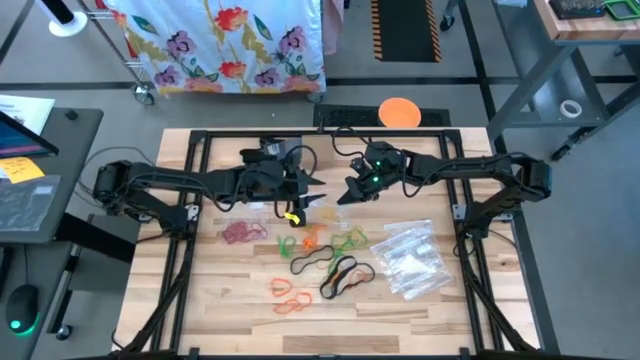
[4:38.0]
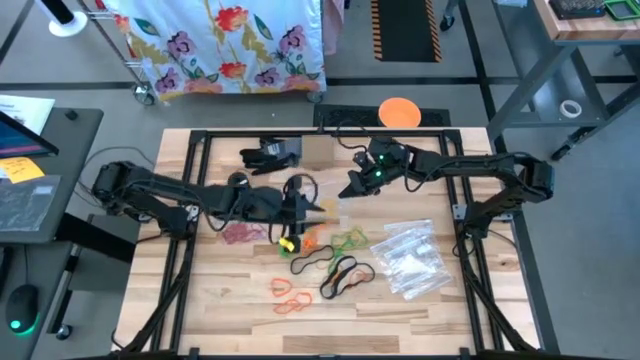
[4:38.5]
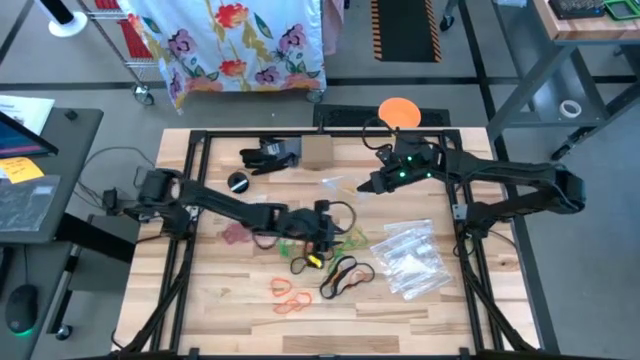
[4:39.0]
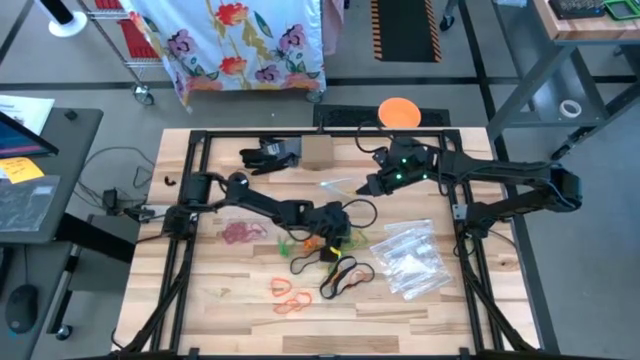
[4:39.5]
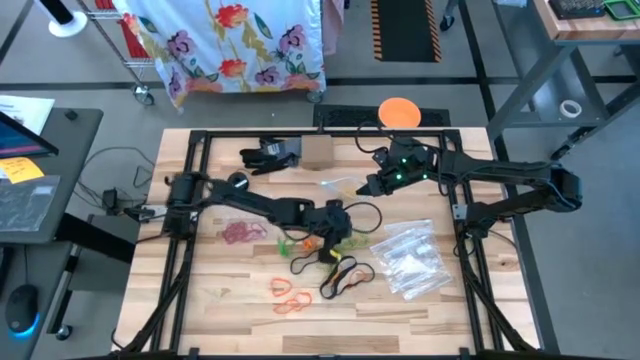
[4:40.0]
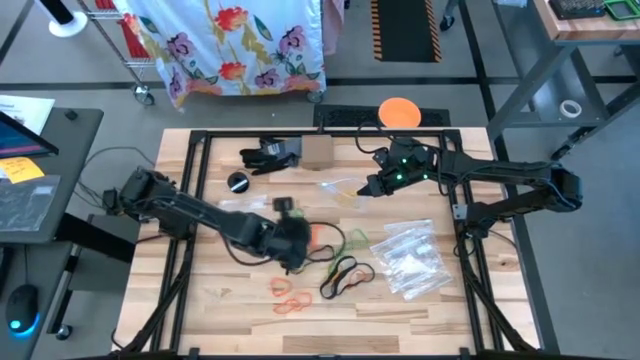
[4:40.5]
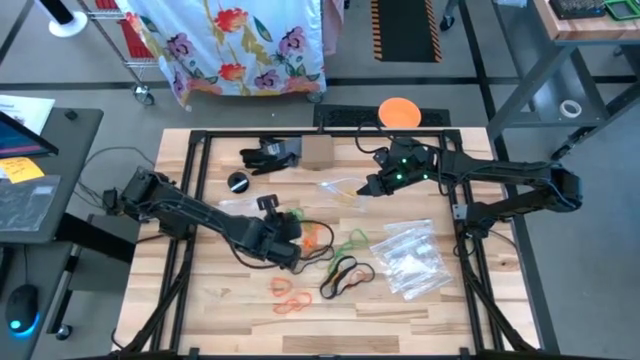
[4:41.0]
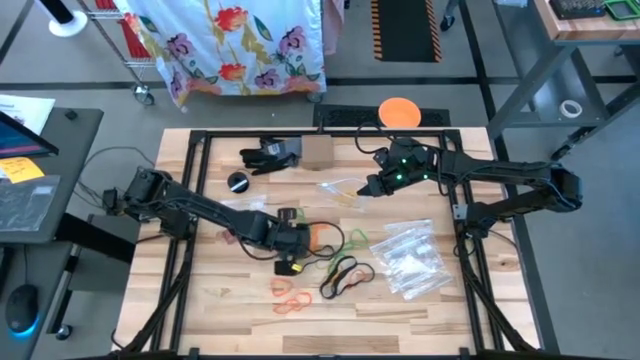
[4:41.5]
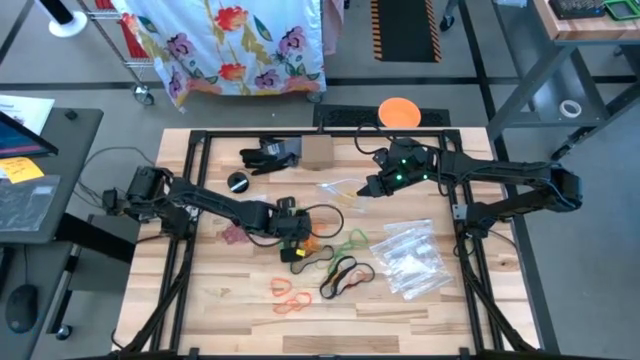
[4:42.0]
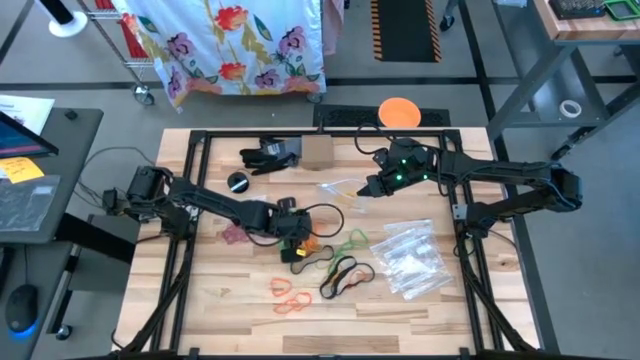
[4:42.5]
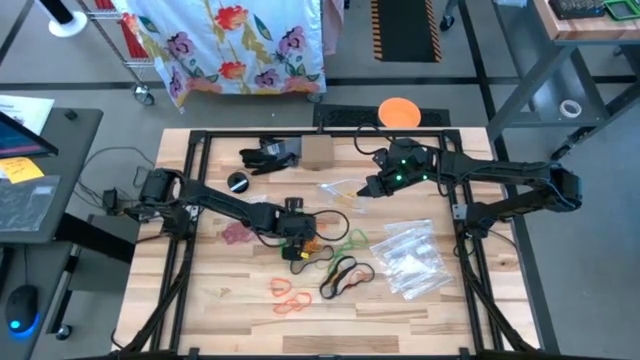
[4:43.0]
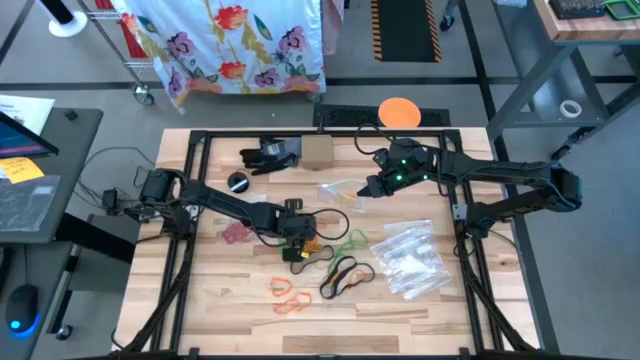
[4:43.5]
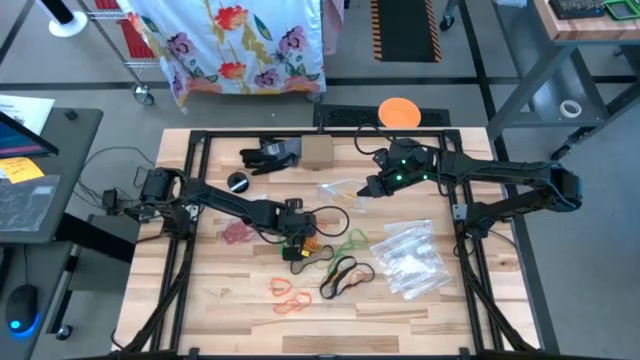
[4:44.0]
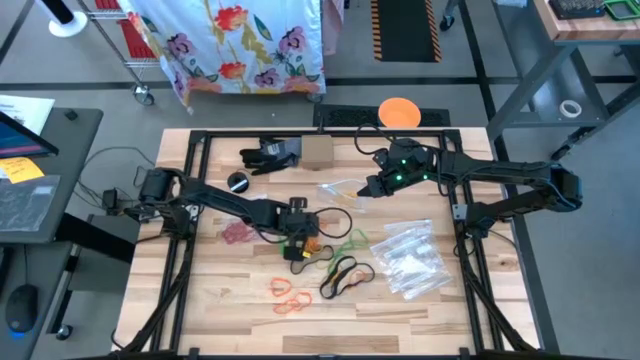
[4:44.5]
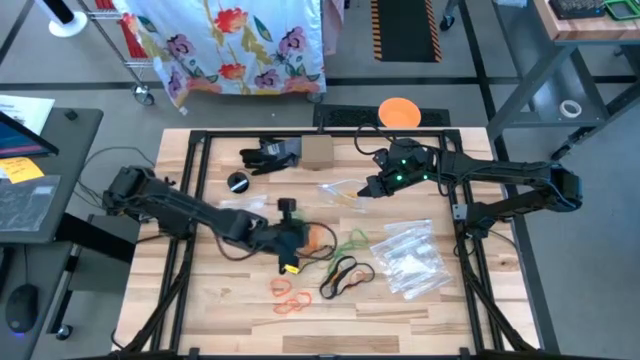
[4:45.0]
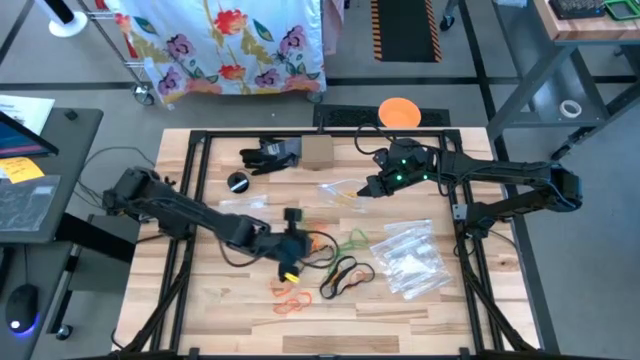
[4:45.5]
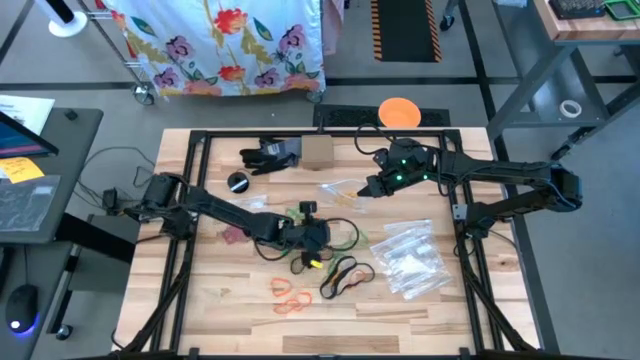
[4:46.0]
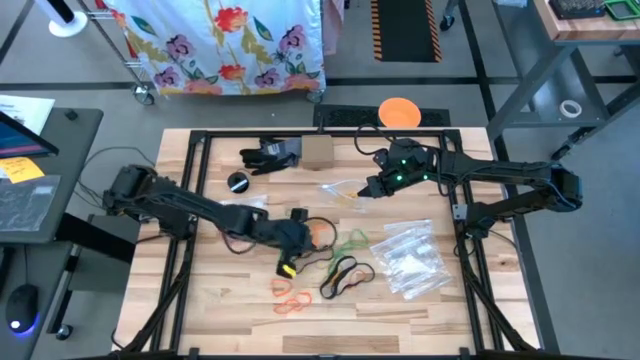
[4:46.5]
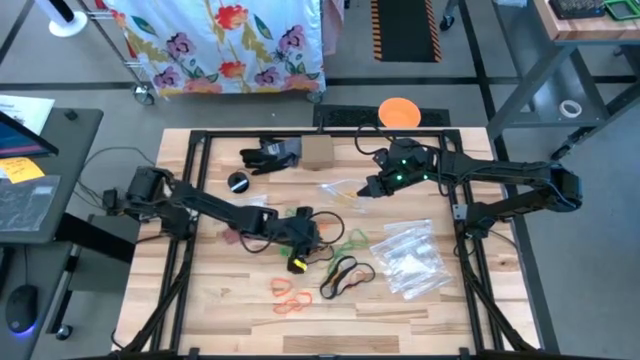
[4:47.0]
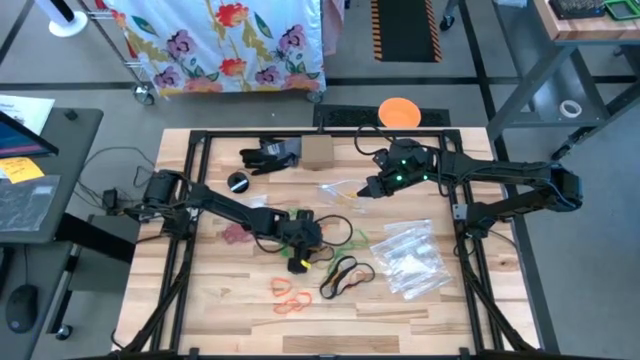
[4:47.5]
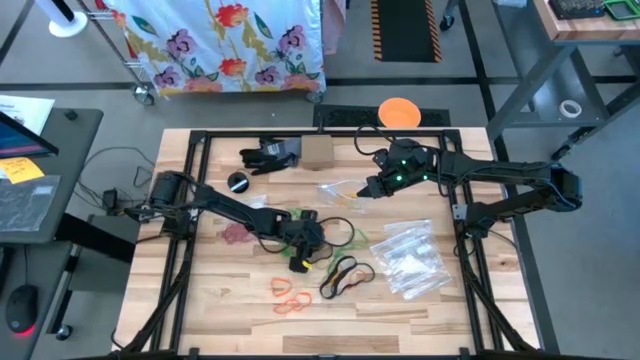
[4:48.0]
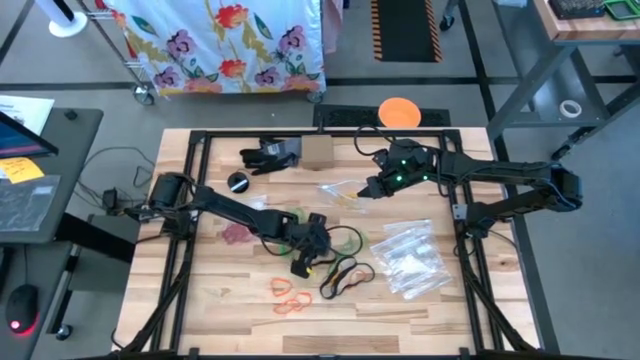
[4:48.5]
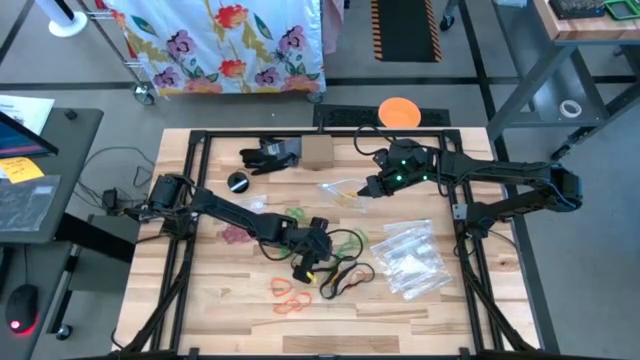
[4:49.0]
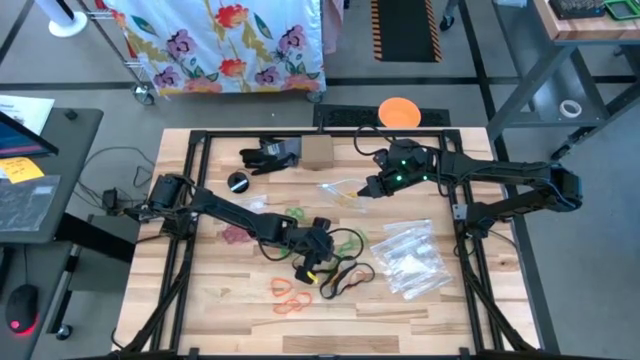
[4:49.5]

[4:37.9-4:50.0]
Task: Sort rubber bands
Put the yellow rubber band into the transparent zip bag

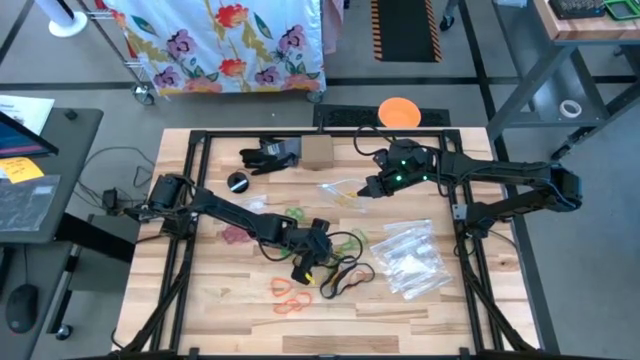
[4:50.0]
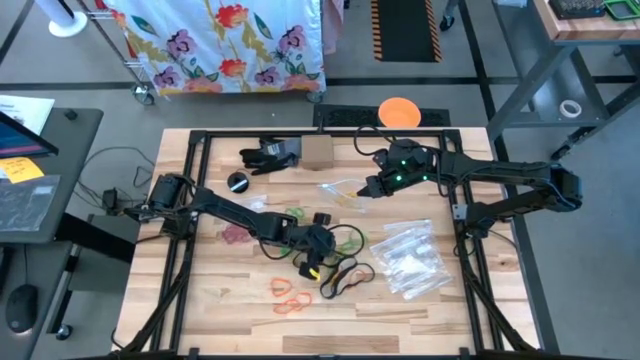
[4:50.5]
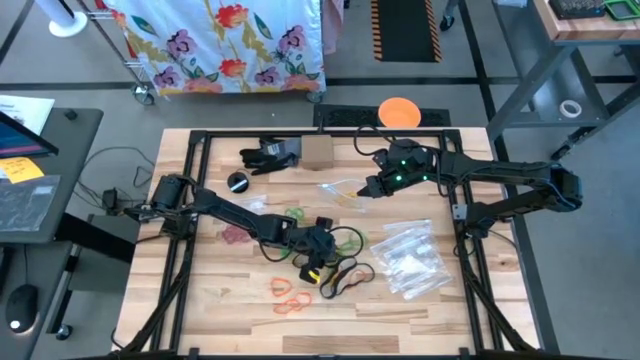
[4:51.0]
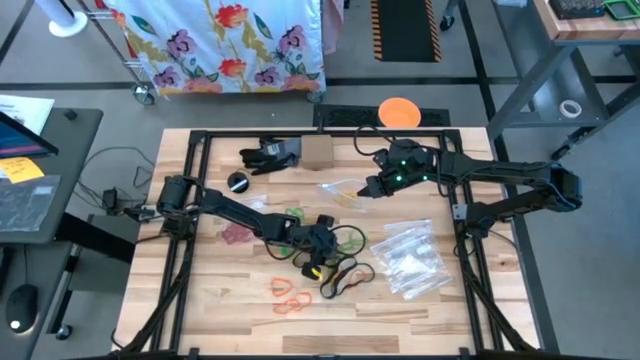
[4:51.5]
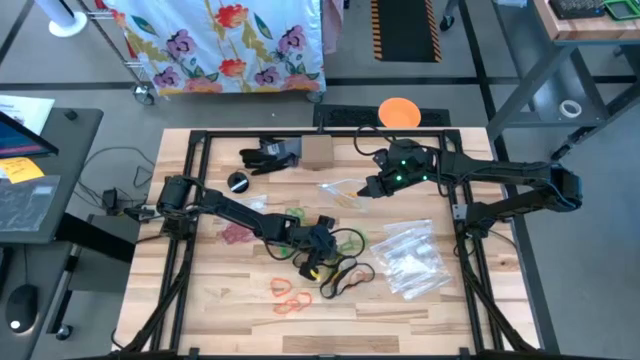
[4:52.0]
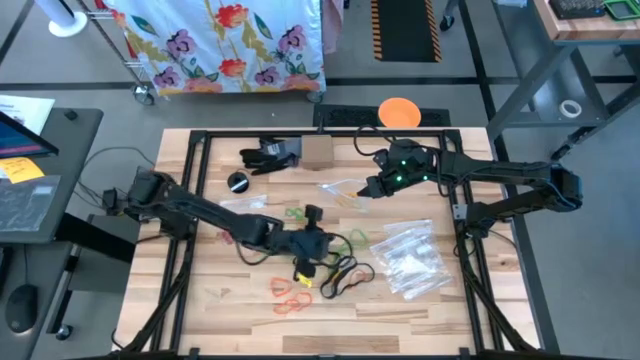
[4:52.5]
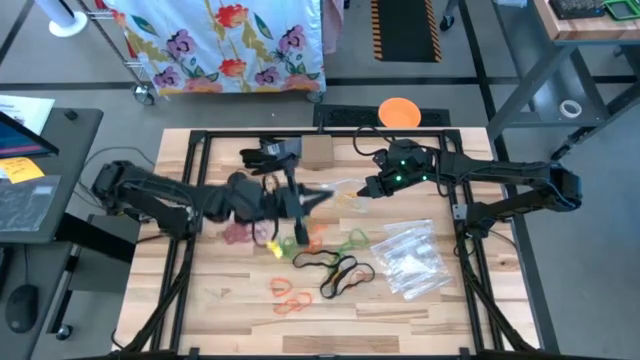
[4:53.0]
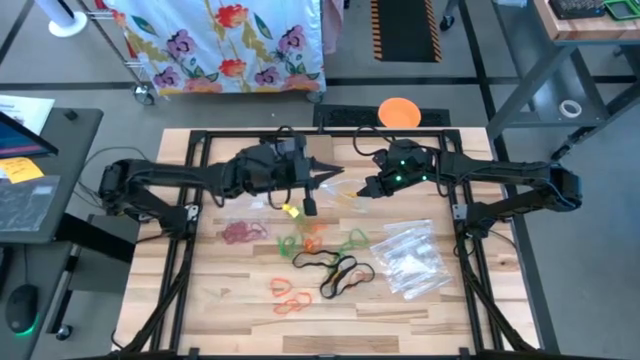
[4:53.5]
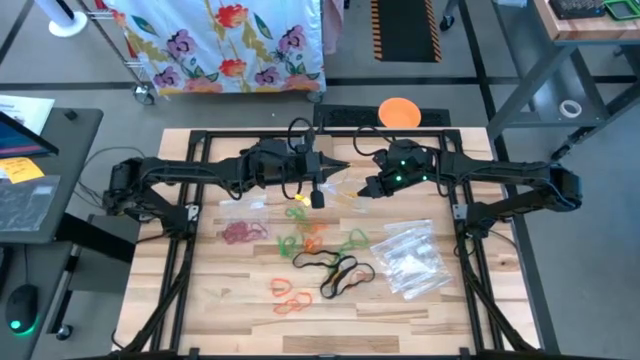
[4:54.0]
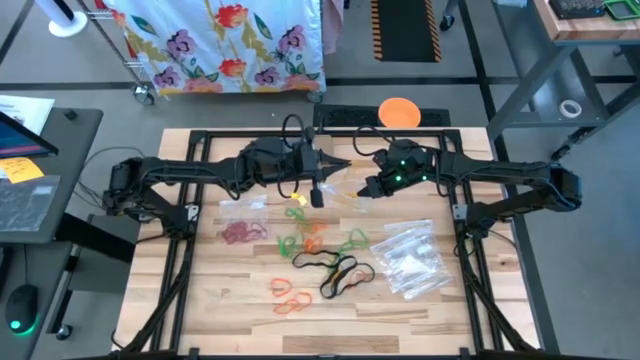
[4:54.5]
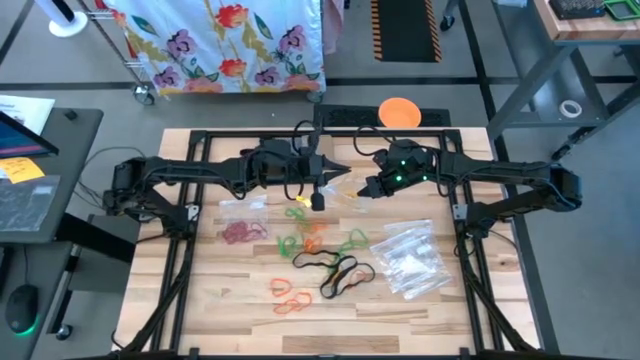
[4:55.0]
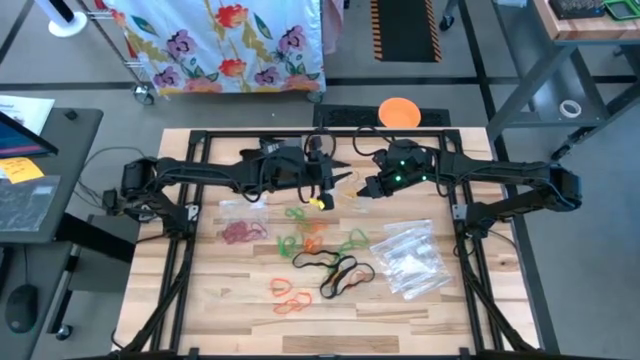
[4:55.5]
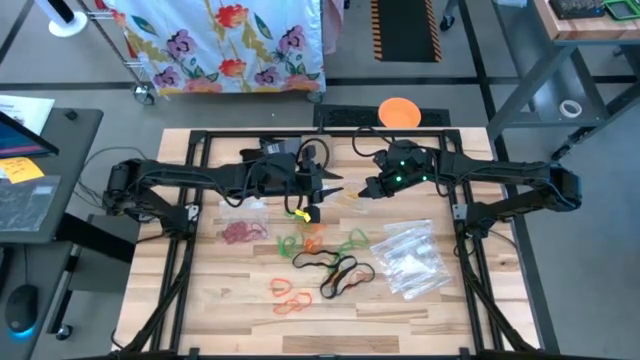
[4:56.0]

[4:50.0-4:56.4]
Put the yellow rubber band into the transparent zip bag

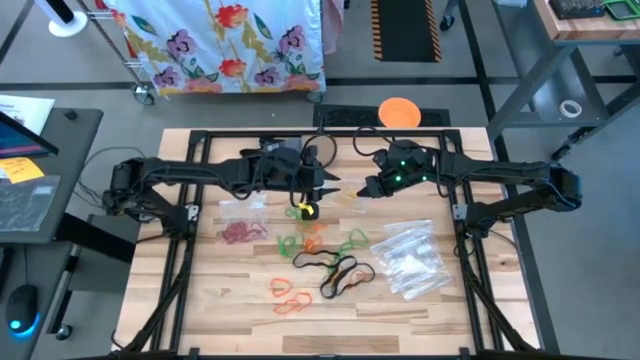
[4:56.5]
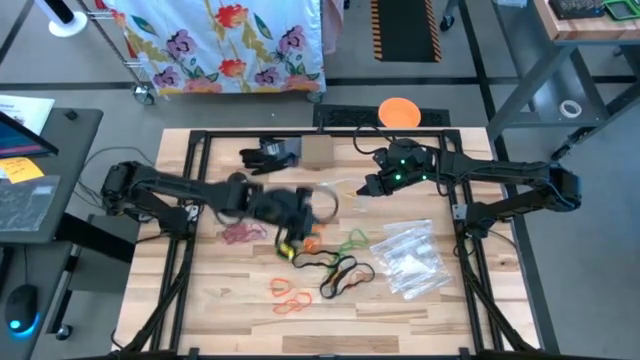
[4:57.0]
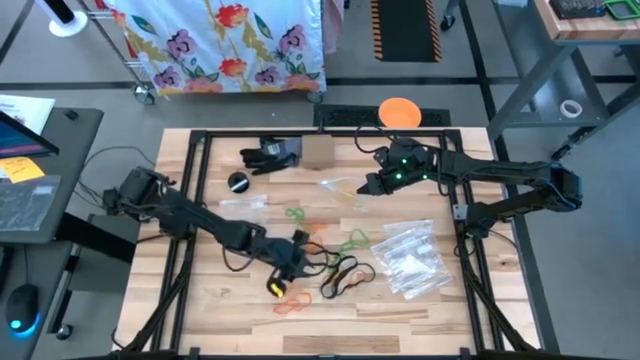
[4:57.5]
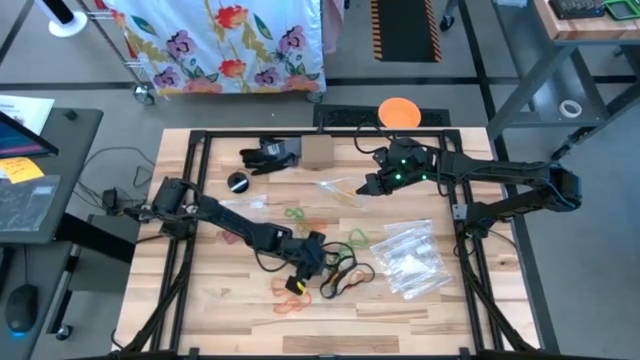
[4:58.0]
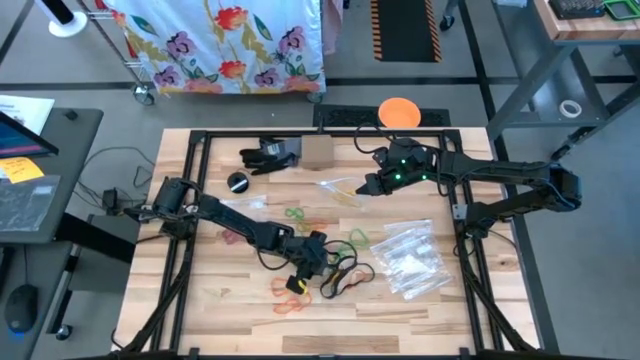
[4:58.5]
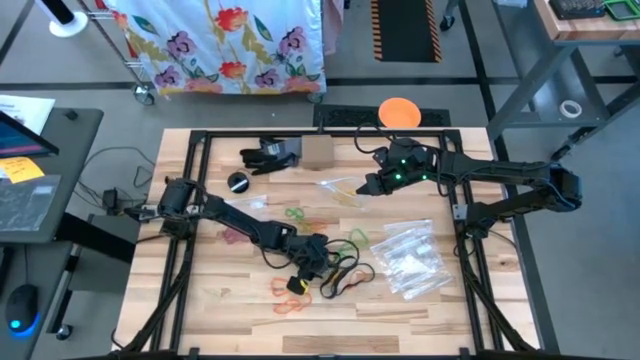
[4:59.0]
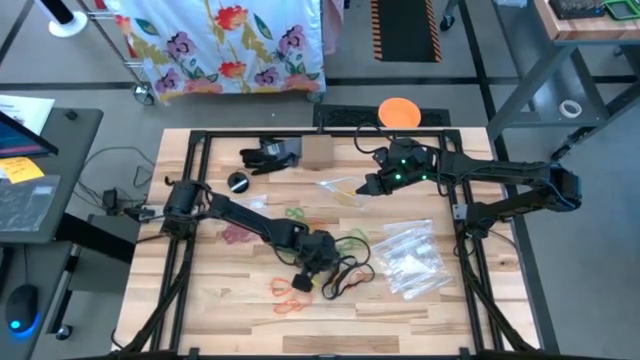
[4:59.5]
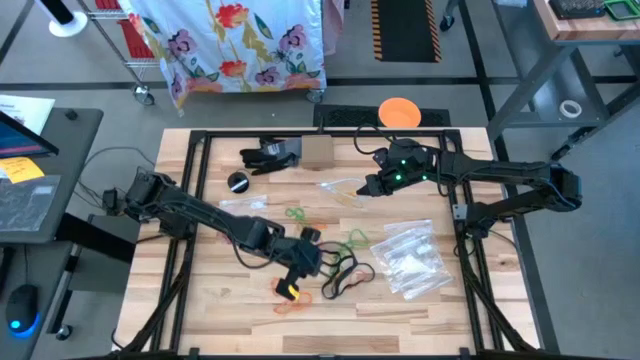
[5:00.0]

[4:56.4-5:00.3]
Put the yellow rubber band into the transparent zip bag

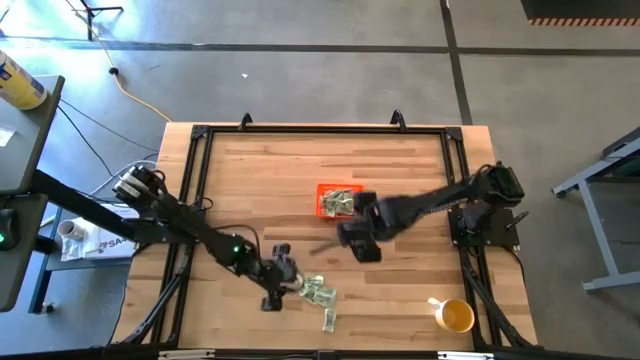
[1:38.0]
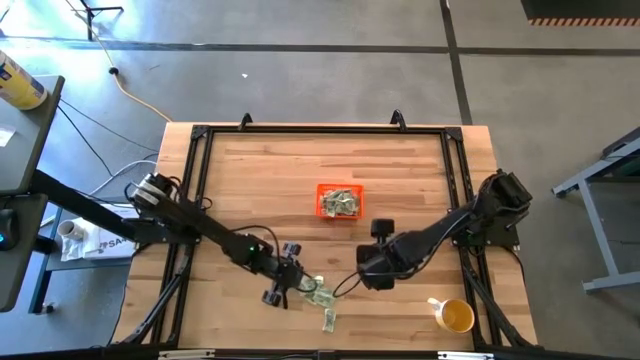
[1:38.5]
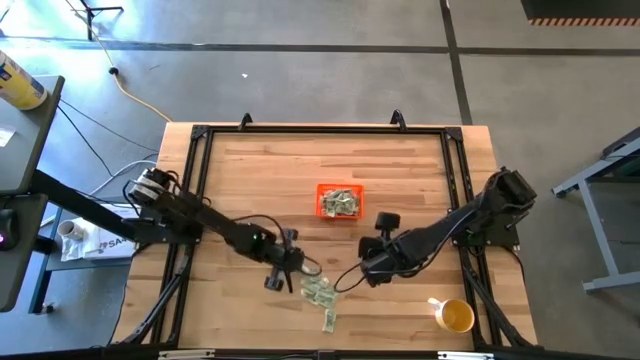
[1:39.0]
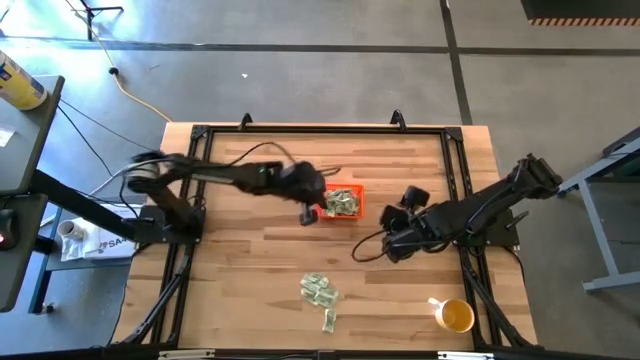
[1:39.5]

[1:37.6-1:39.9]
Task: Pick and place Stevia / Truvia into bins
Put the stevia packet into the orange bin
